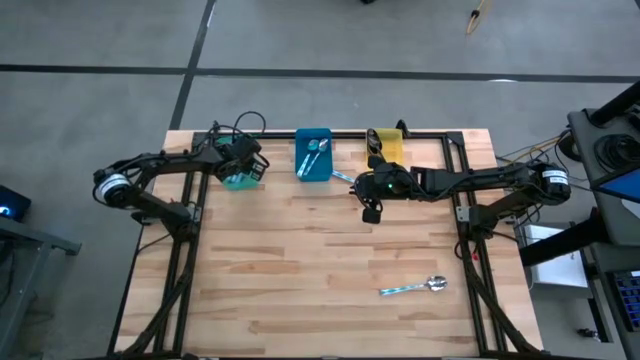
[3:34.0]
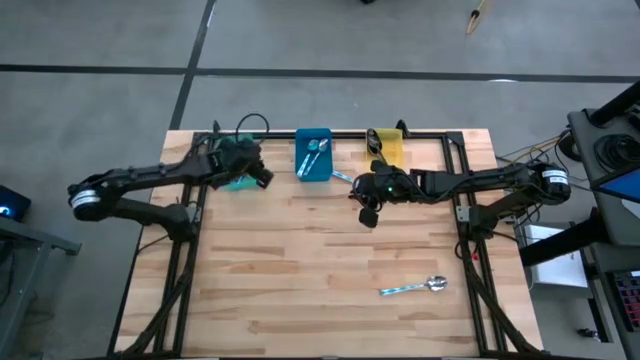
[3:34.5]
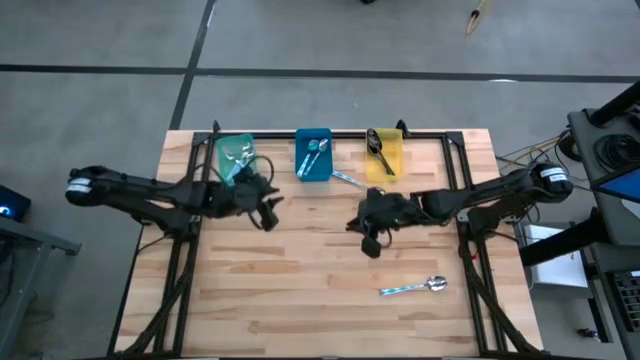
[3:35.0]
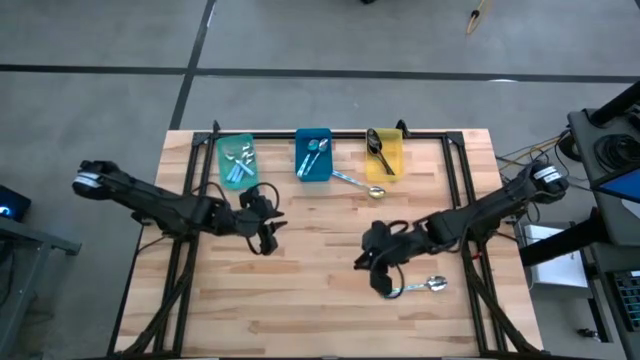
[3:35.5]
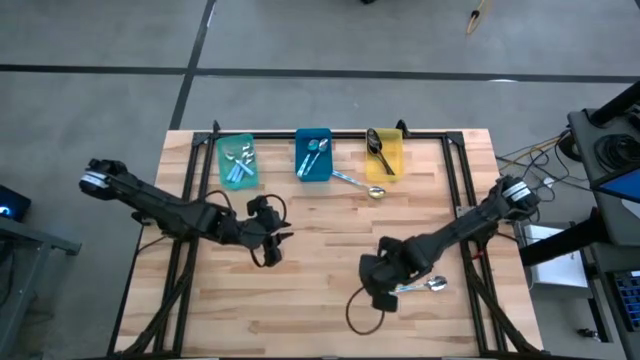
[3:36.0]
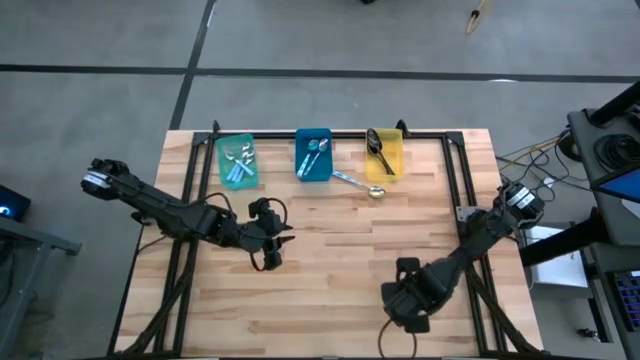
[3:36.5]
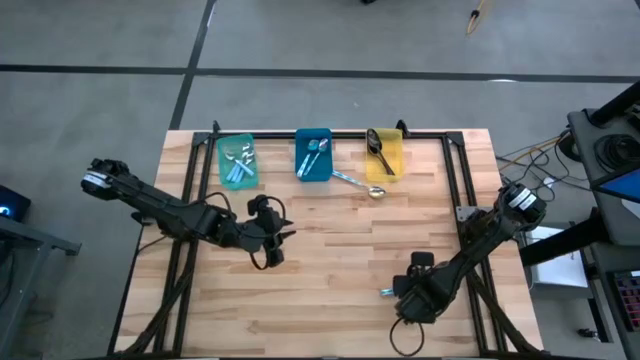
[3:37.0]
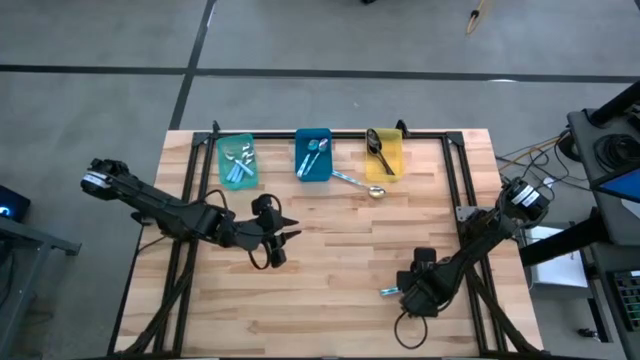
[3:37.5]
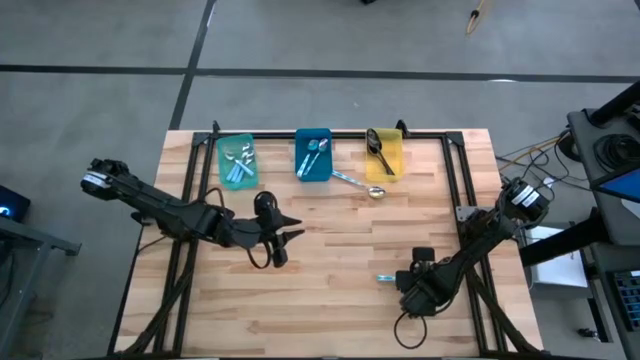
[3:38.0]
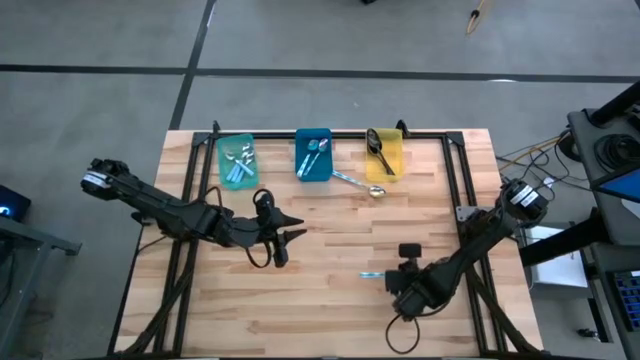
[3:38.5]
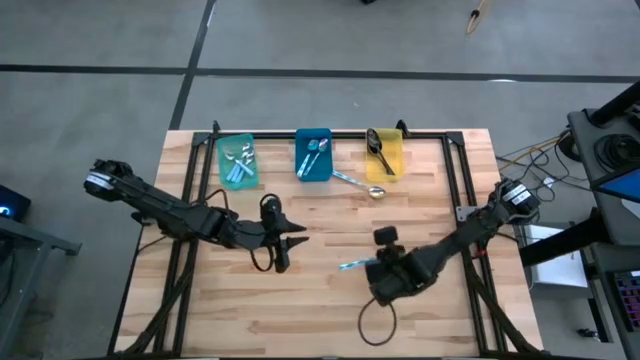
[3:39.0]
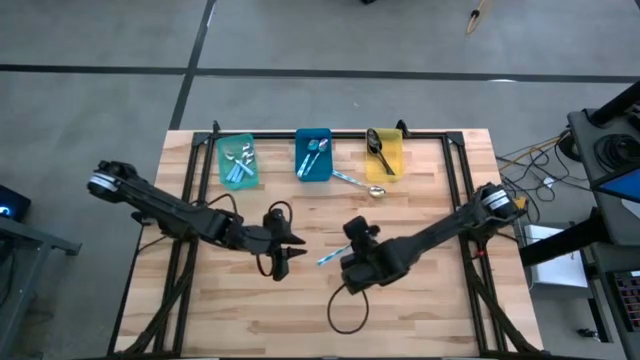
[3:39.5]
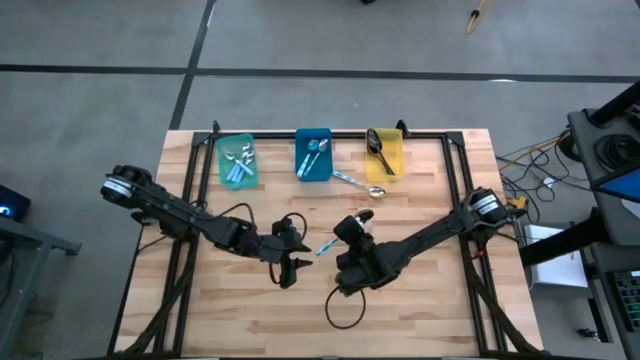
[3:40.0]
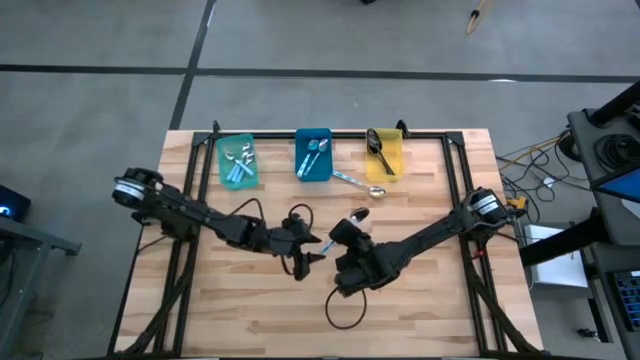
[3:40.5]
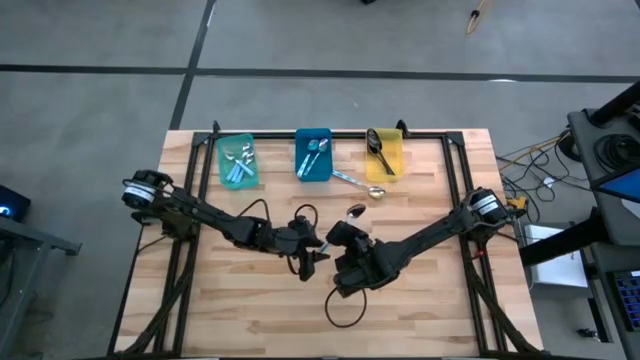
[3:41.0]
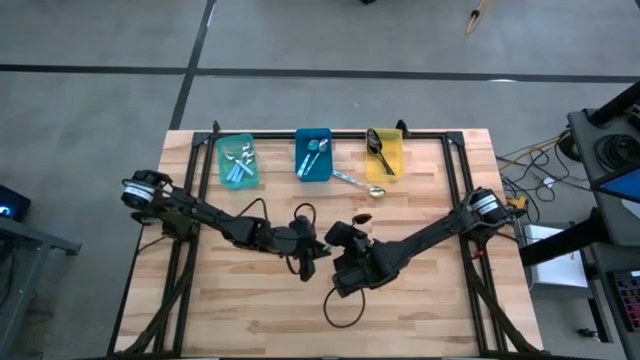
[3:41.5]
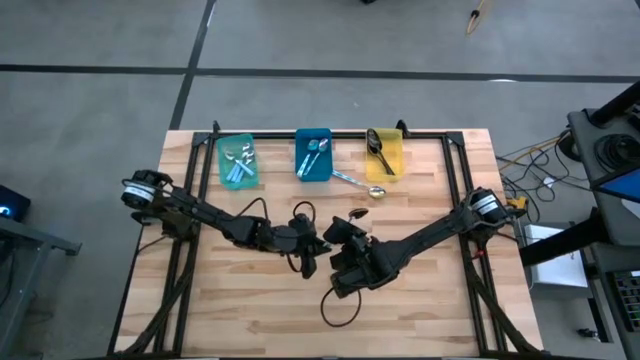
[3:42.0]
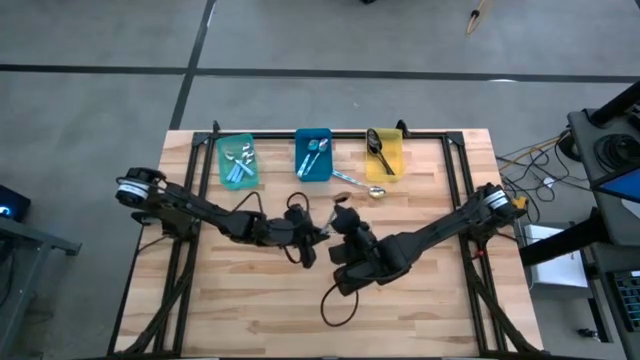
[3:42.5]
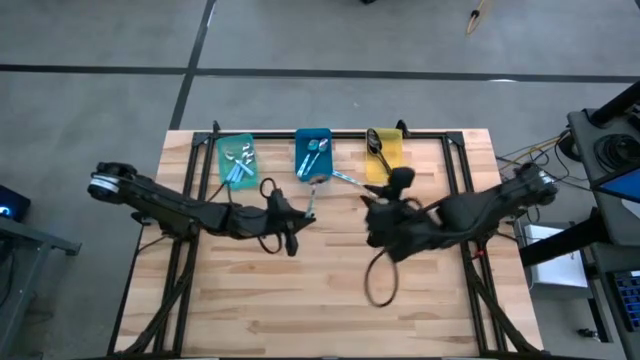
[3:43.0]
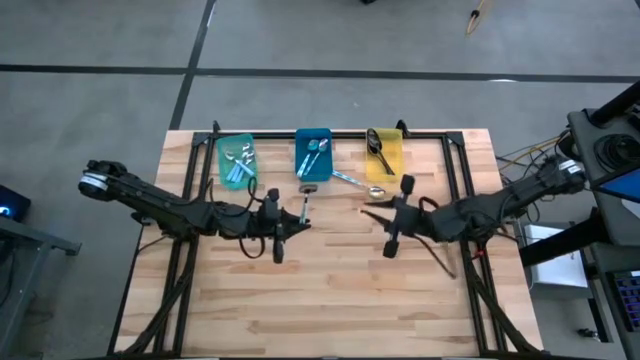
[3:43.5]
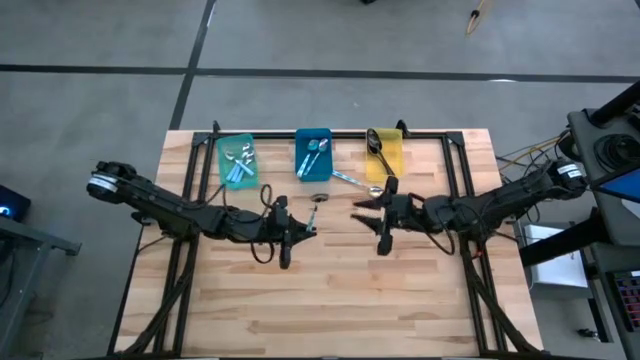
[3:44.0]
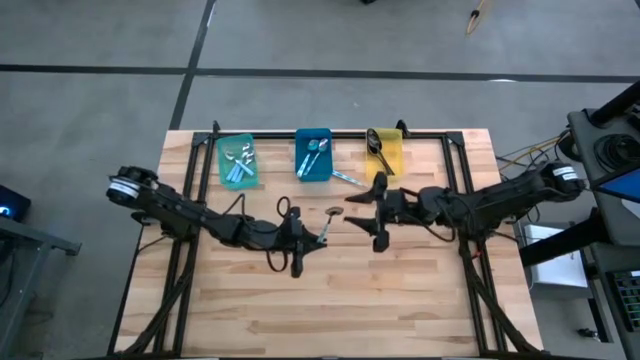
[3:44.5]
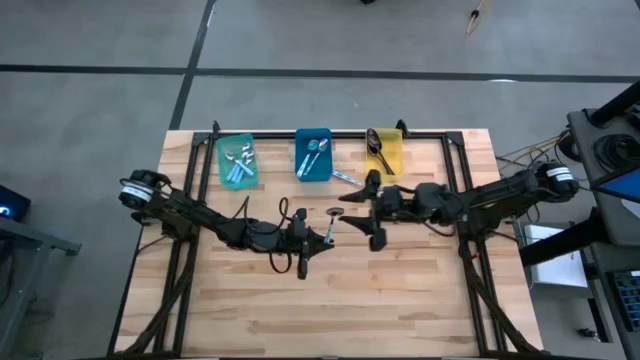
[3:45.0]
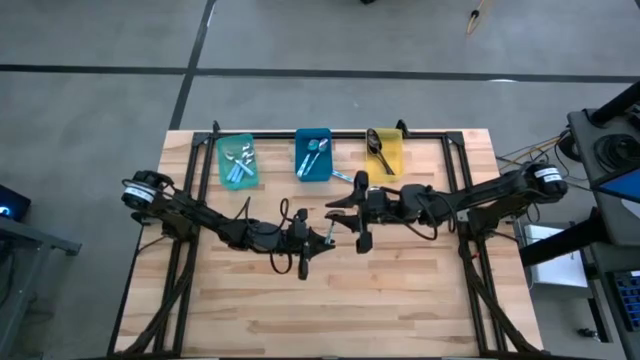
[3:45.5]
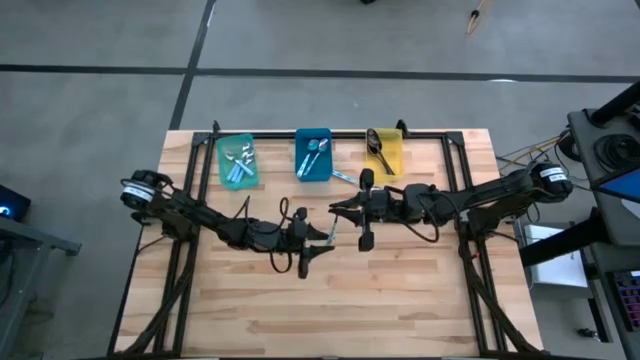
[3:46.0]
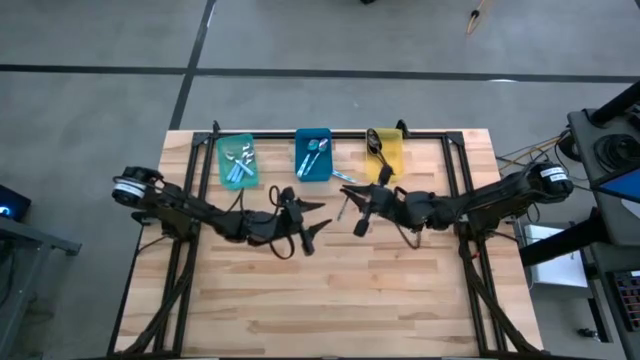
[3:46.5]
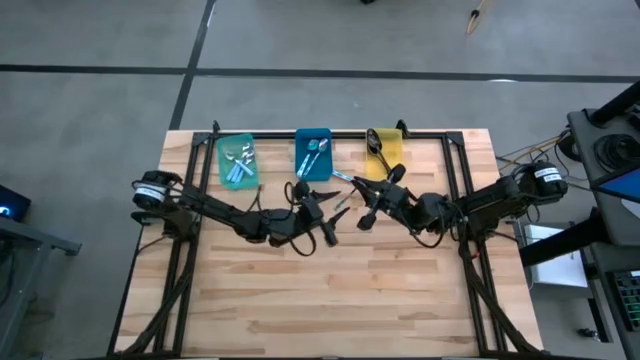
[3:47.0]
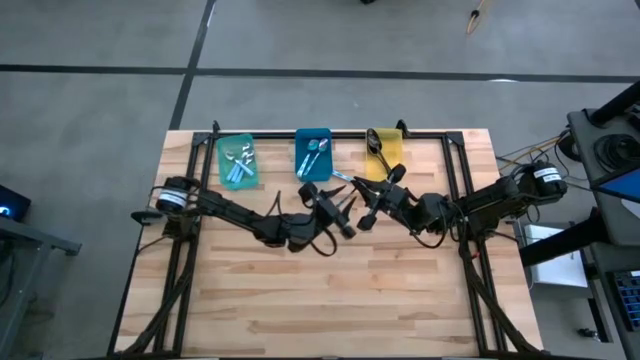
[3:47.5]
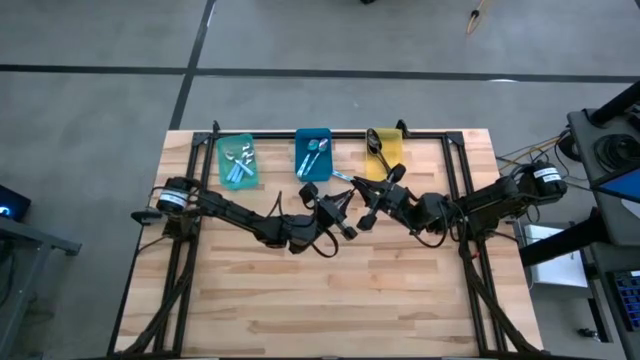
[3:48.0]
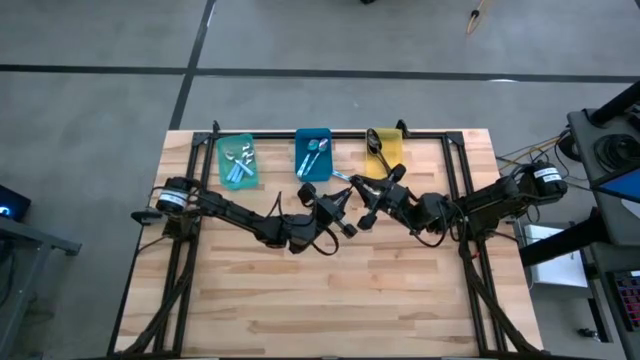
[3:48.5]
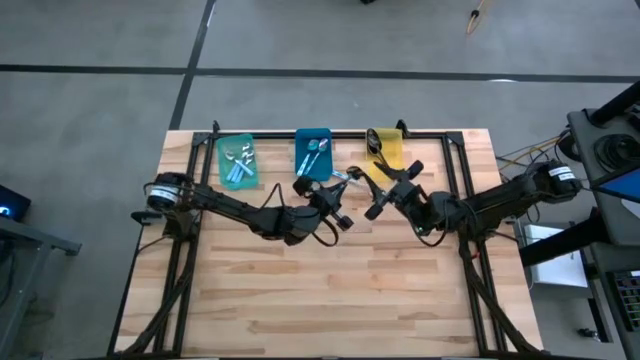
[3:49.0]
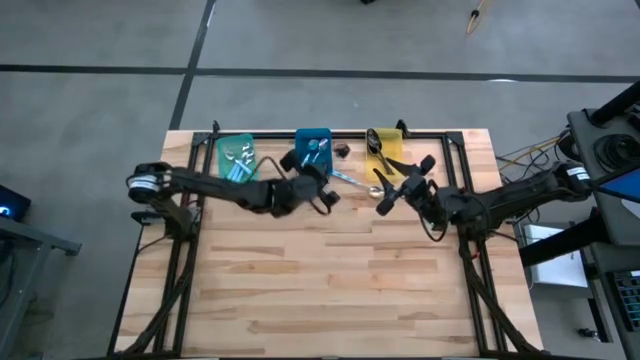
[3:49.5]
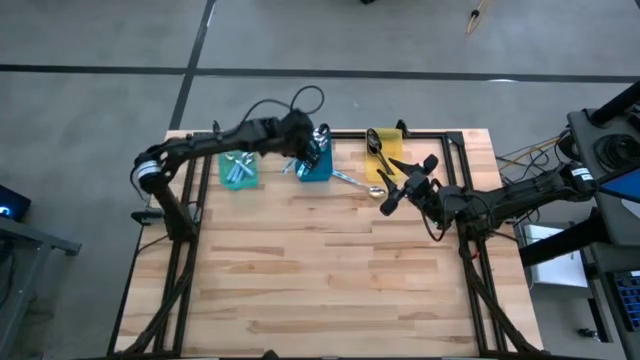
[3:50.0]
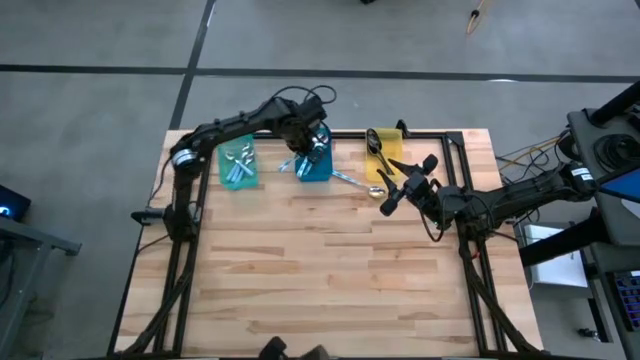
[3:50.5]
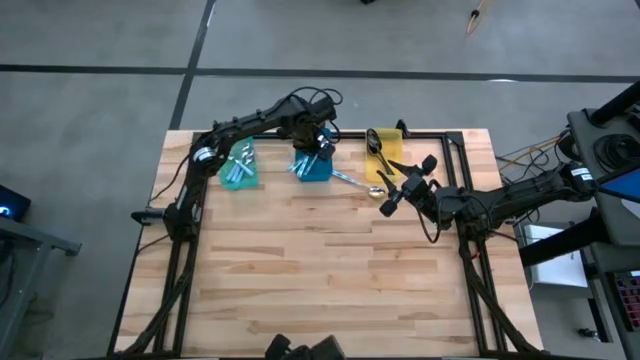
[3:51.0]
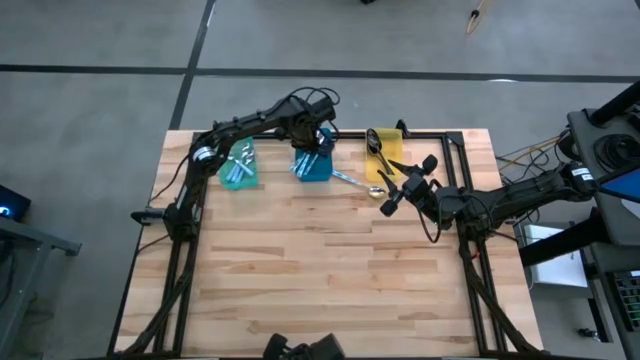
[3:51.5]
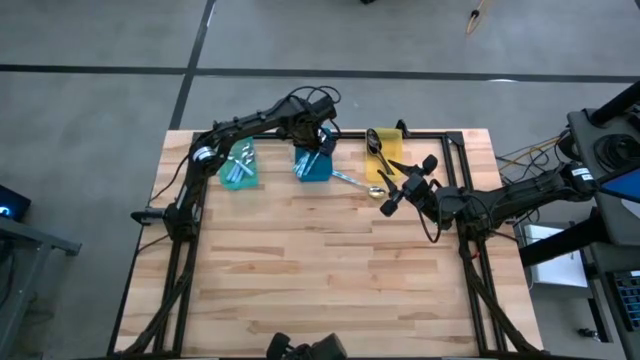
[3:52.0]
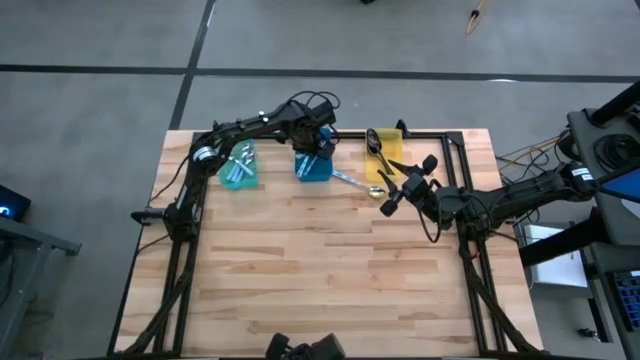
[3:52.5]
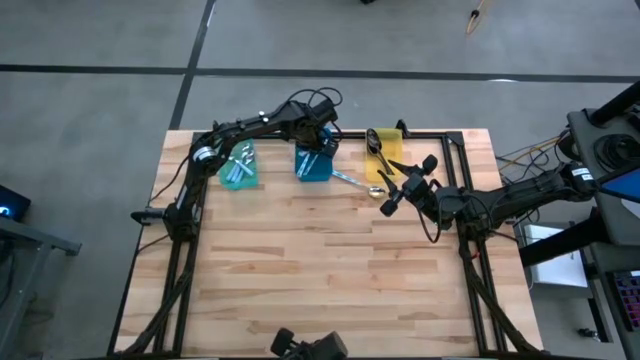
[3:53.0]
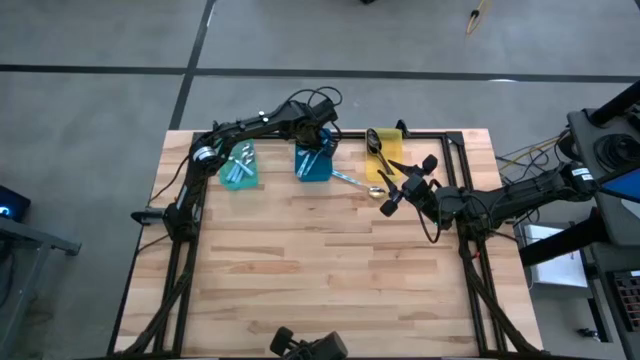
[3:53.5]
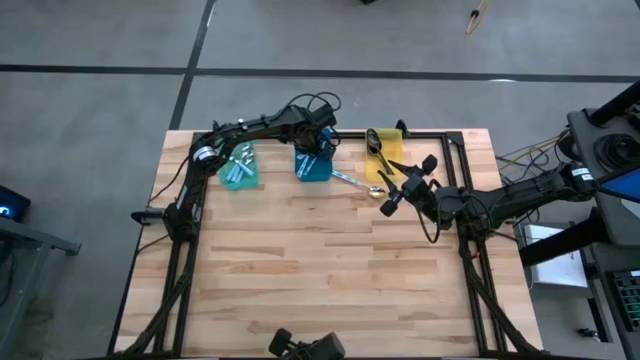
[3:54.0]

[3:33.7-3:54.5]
Task: Sort silverware by color (type)
Put the white-blue spoon into the blue bin
